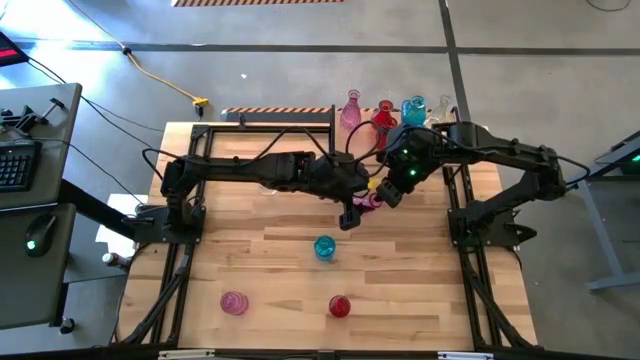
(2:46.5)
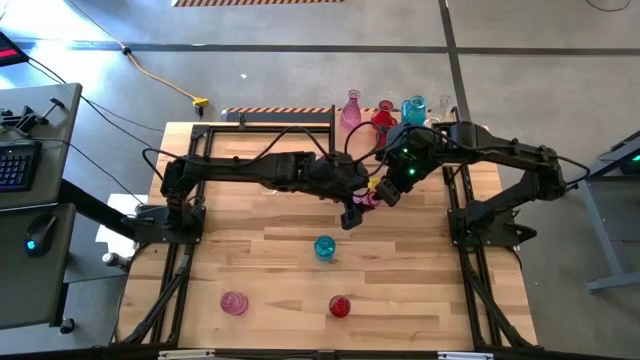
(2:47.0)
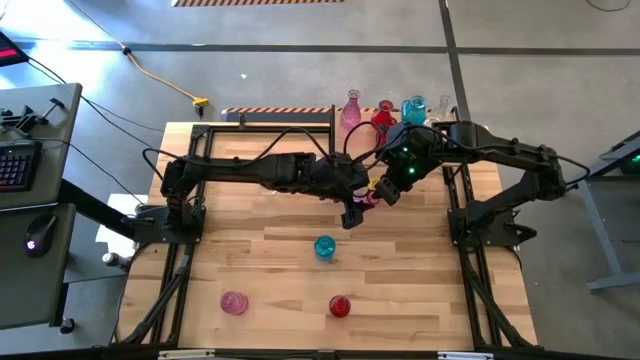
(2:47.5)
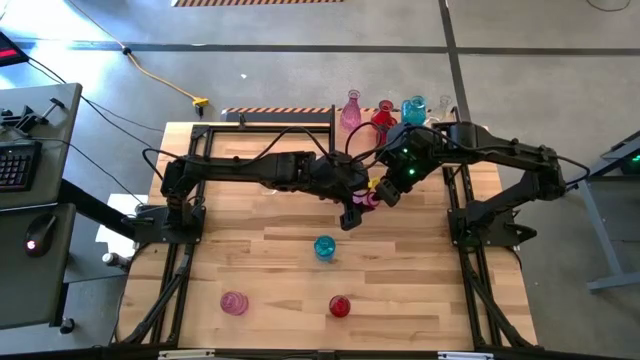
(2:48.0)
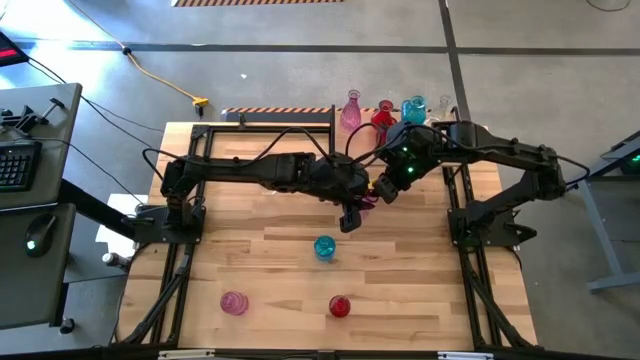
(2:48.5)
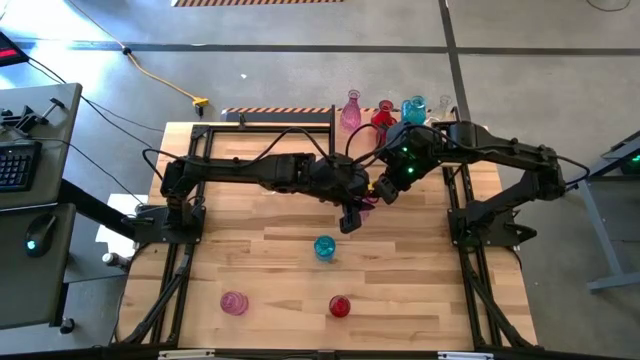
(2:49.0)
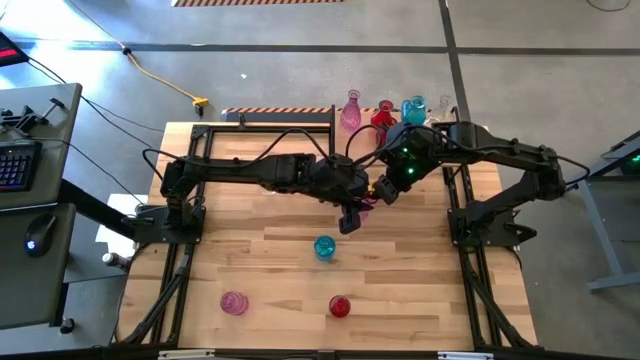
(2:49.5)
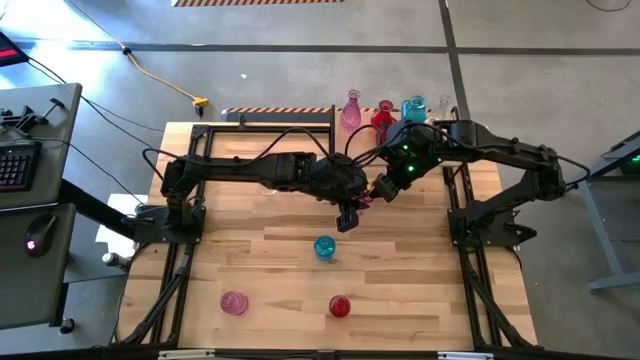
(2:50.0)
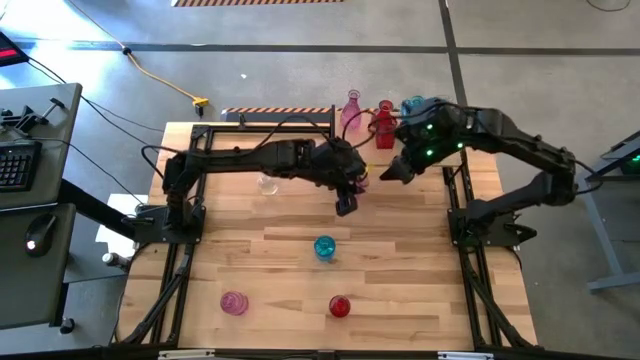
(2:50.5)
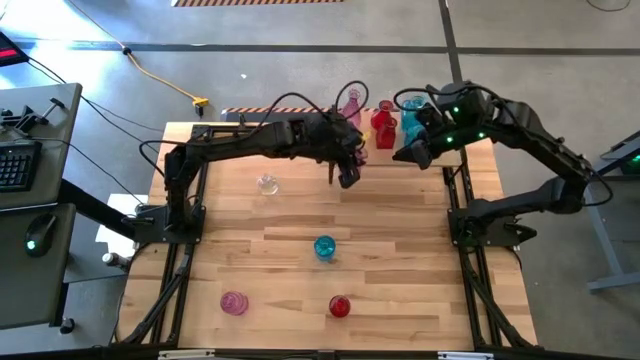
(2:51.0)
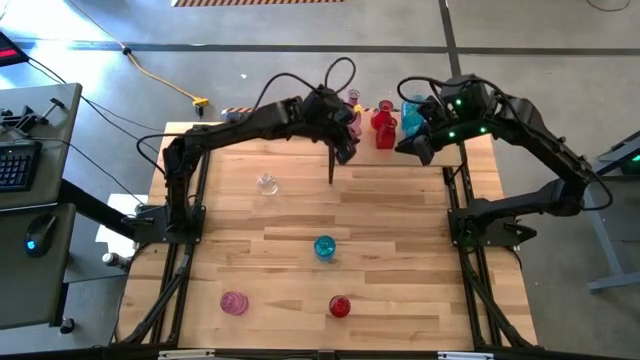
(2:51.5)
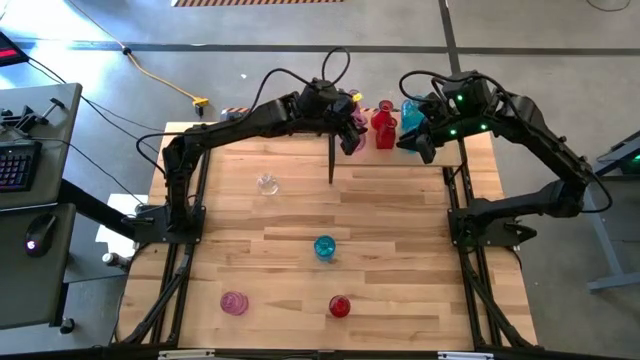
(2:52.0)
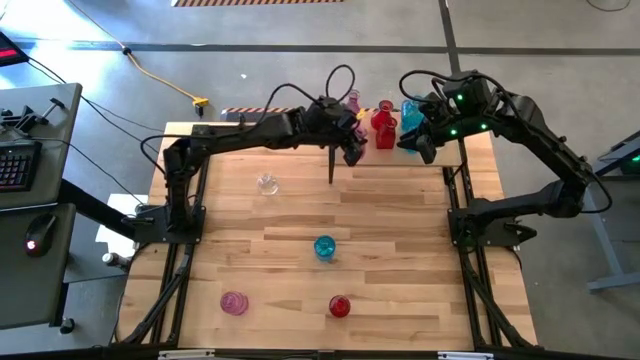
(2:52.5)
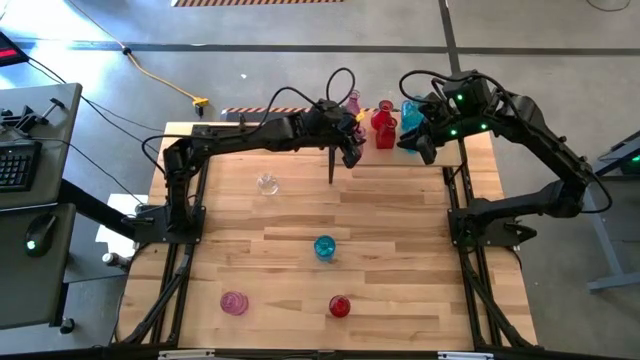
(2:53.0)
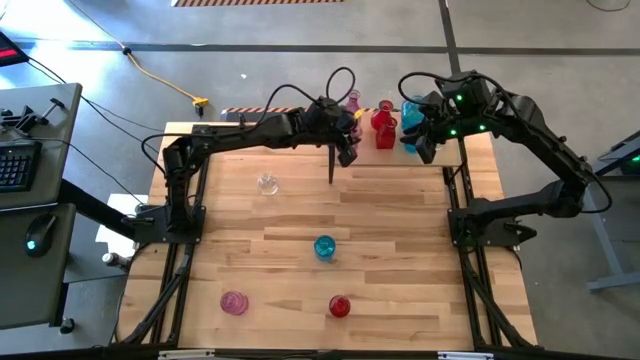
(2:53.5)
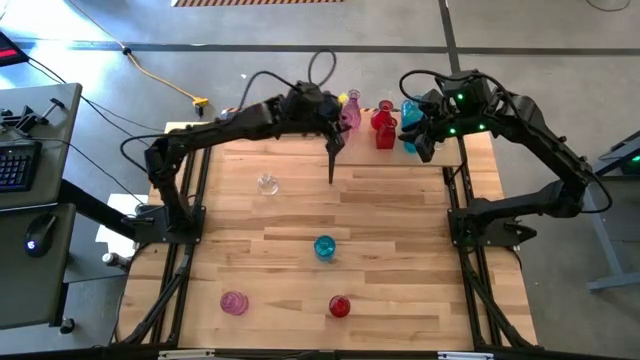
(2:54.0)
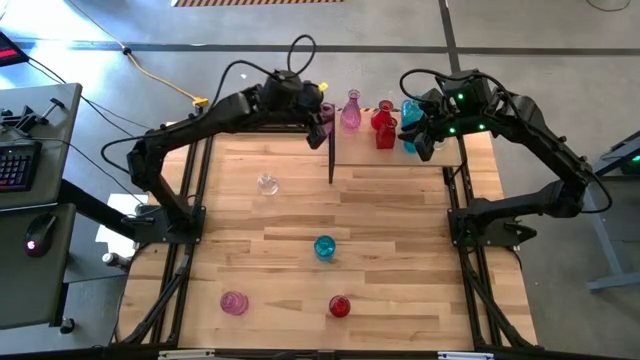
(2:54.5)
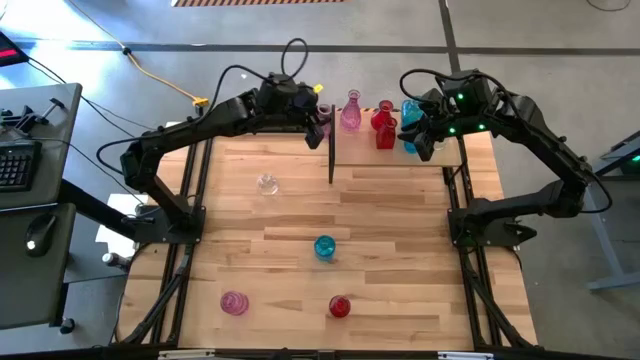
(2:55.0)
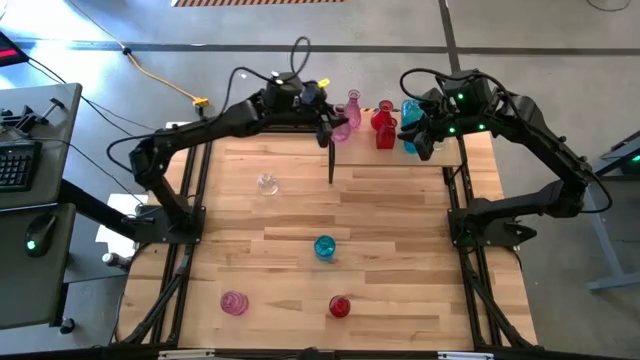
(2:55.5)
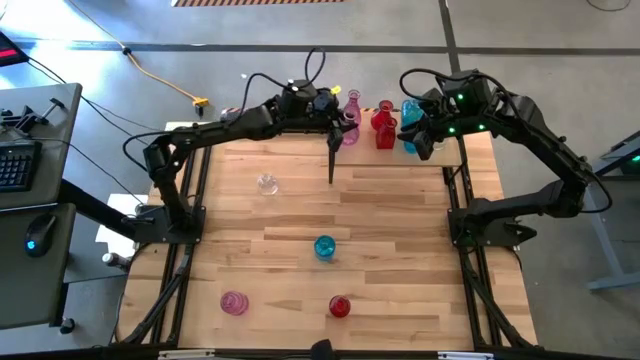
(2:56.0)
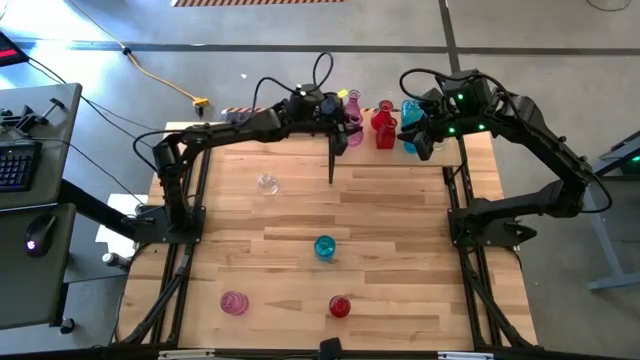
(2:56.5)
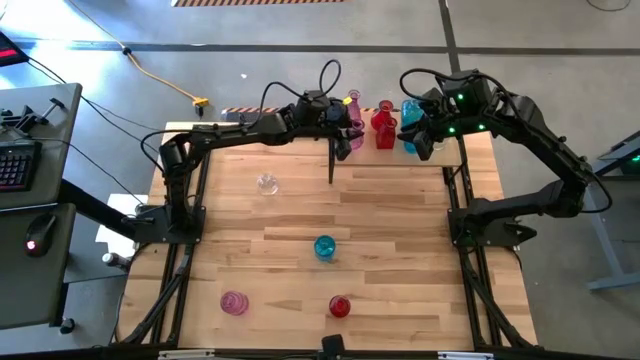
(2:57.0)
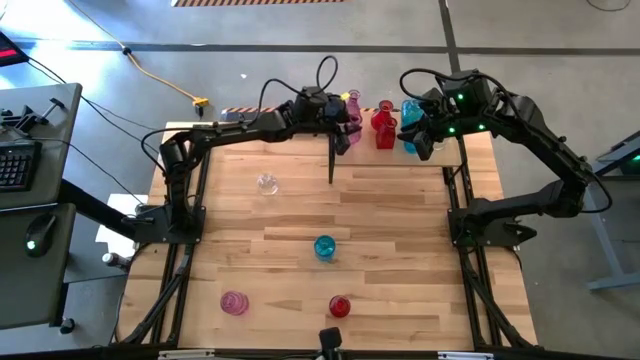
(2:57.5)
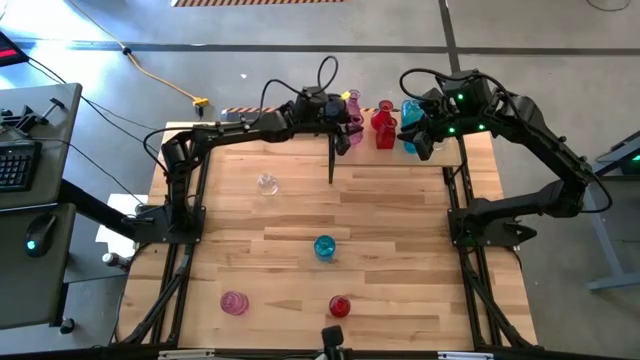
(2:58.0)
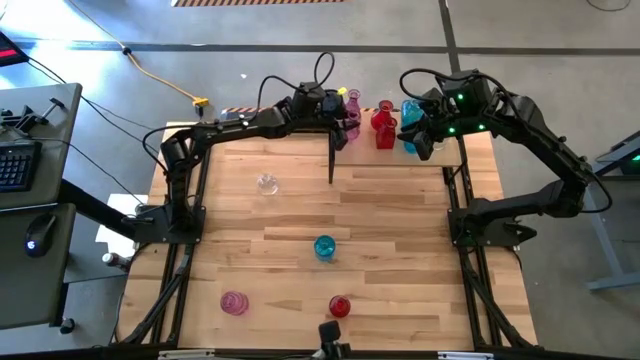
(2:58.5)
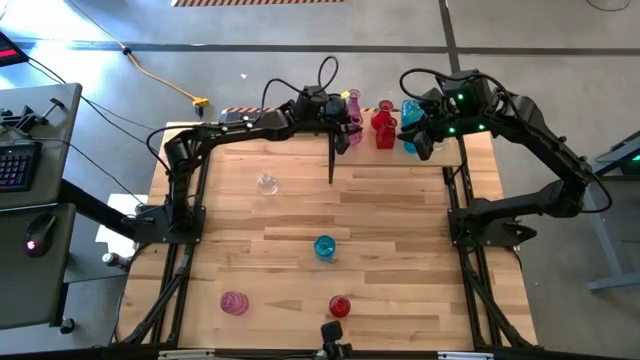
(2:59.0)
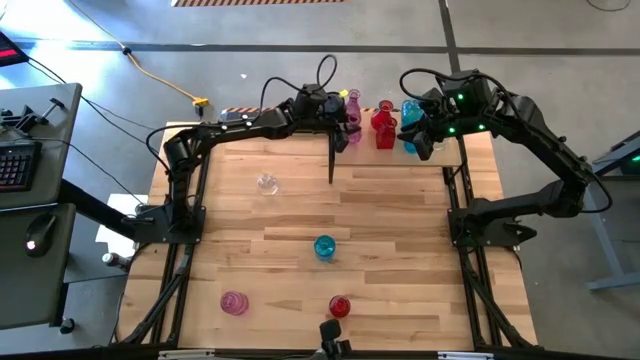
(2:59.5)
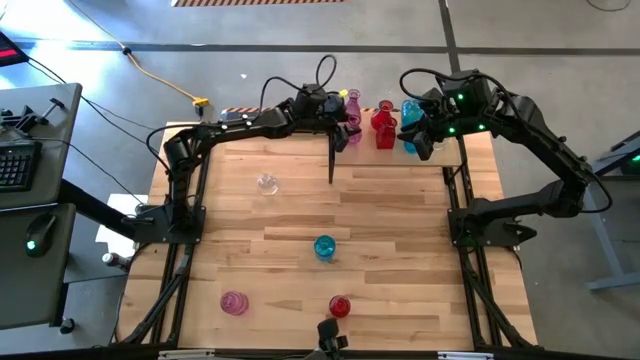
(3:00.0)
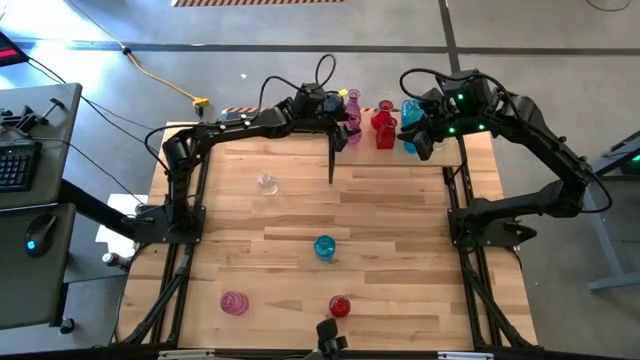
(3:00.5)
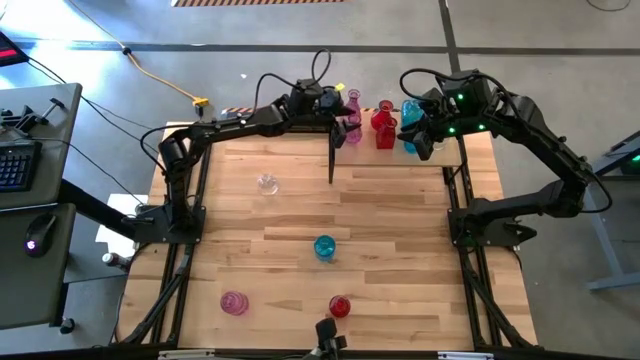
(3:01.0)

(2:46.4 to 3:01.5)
Task: sort vases onto shelf
Put the right pink vase on the shelf aligned with the pink vase

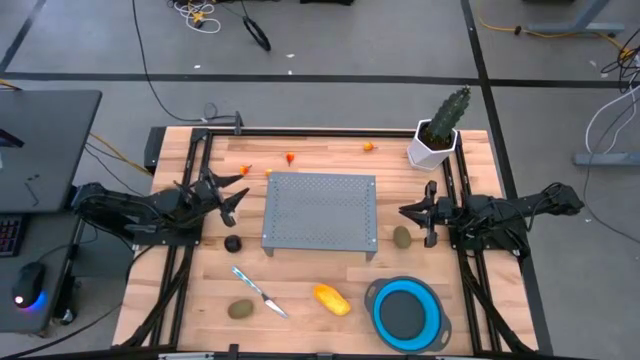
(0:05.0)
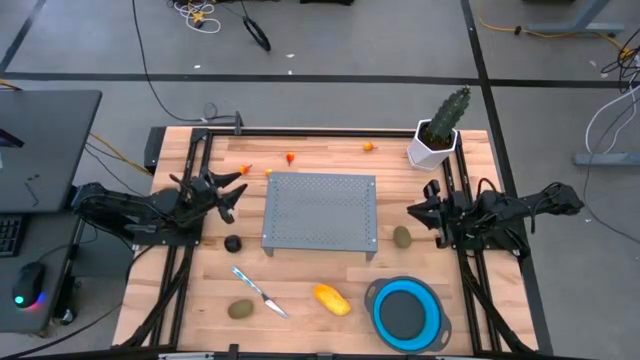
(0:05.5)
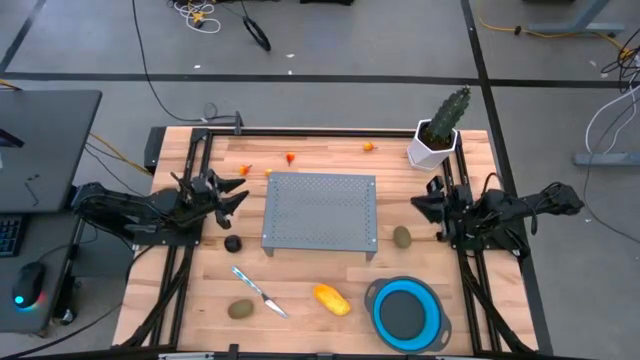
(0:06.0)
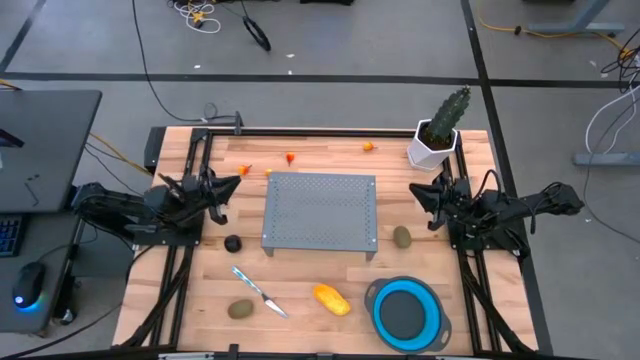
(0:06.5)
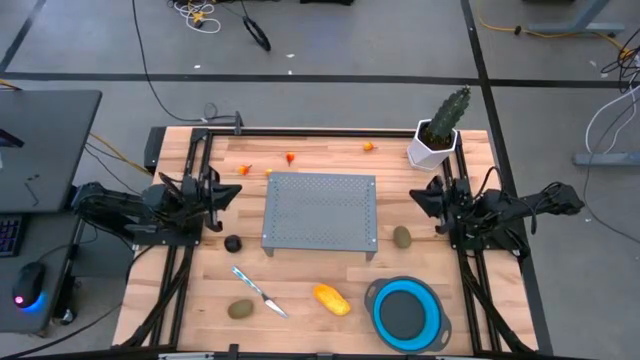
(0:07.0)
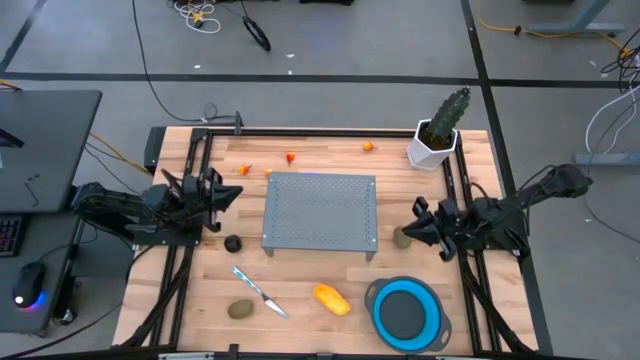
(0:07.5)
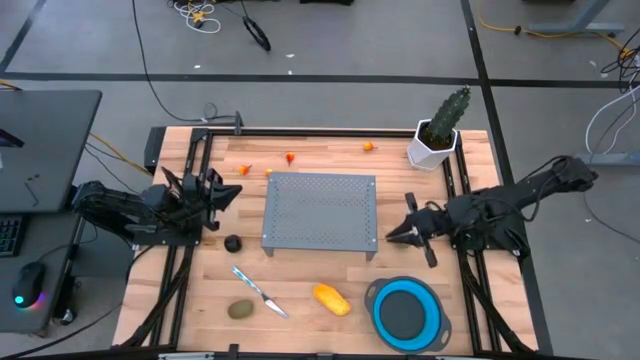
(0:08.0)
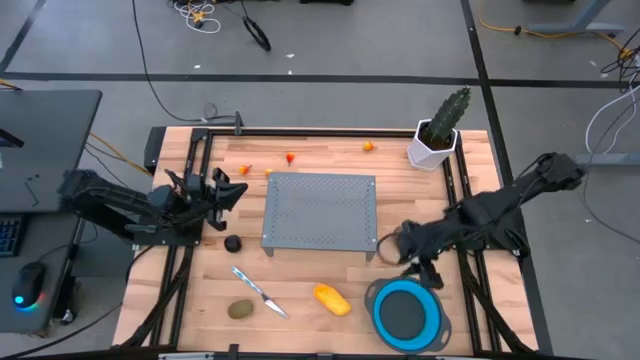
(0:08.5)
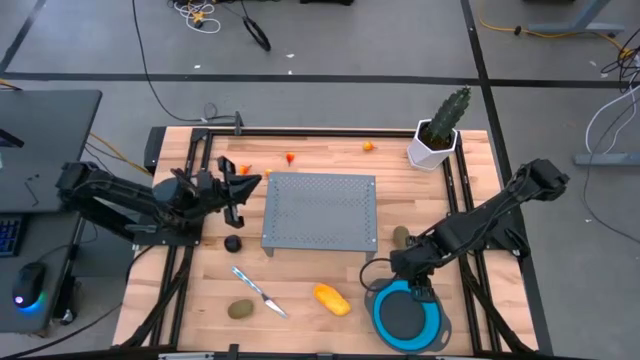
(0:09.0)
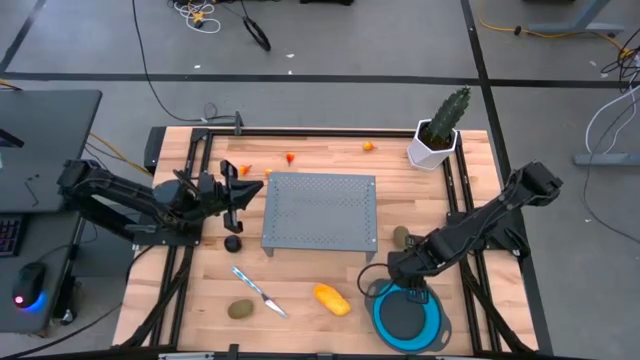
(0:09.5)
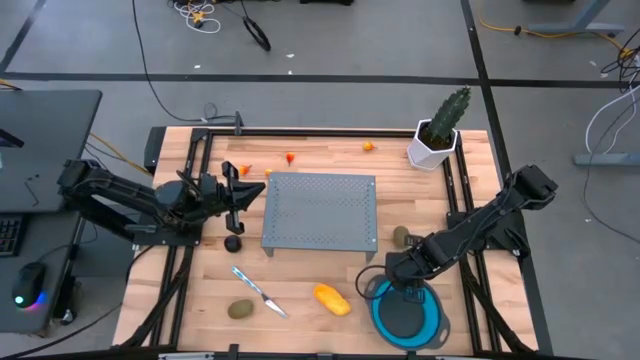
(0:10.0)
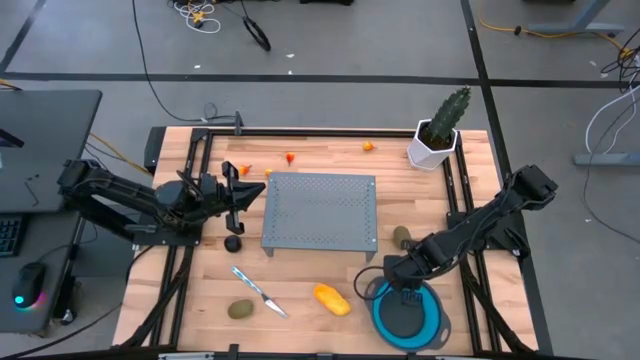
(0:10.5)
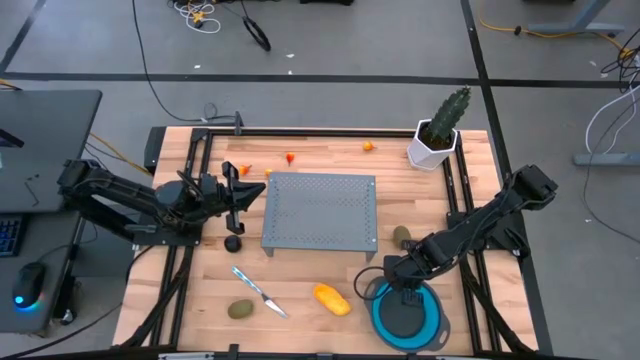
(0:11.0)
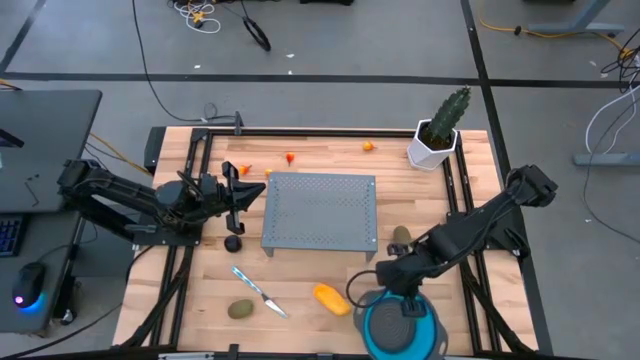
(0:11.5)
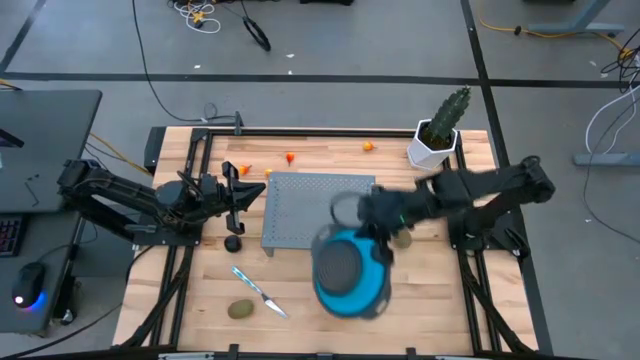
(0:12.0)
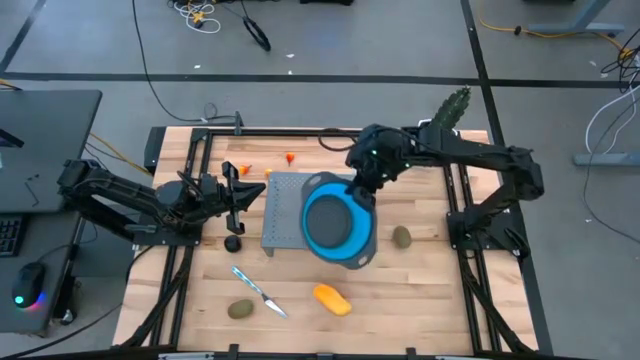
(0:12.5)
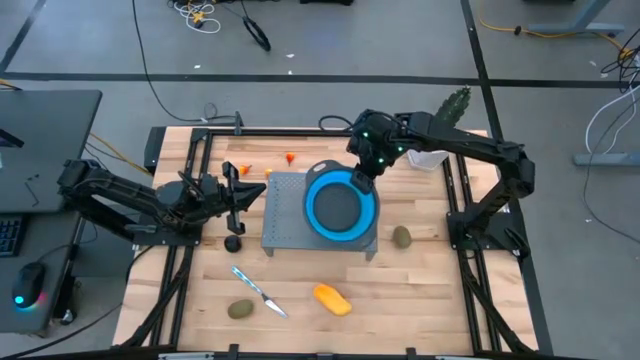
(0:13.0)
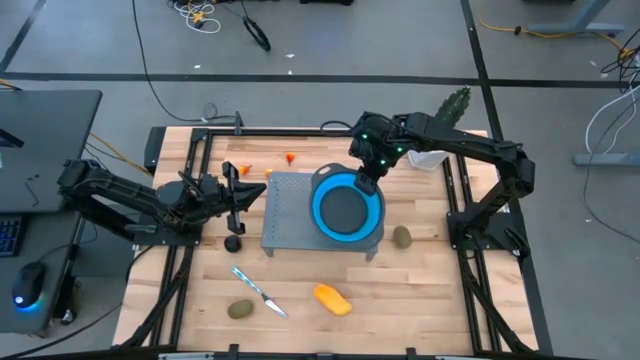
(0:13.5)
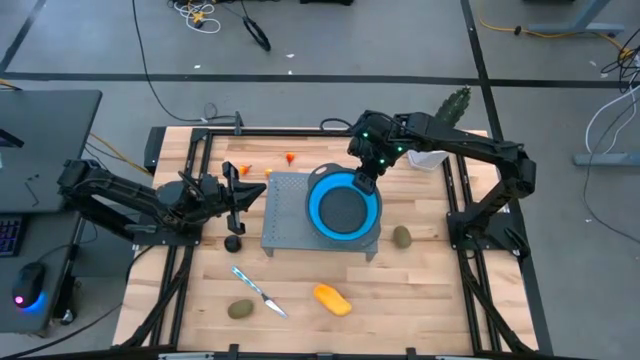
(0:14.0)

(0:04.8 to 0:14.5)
Task: Pick & Place Fruit
Put the blue strainer bowl on the shelf
